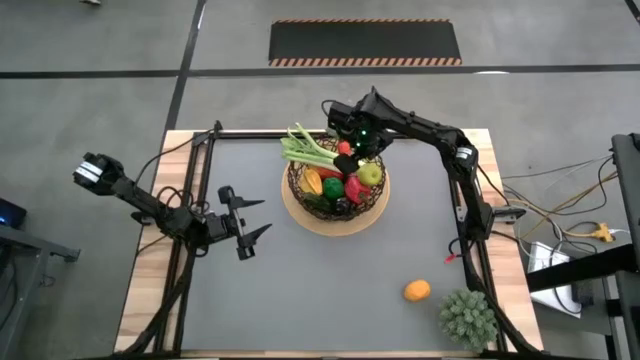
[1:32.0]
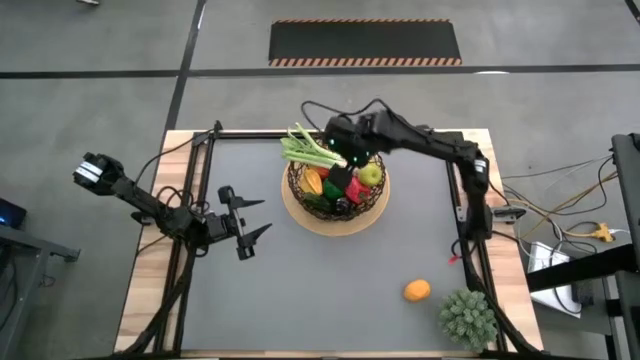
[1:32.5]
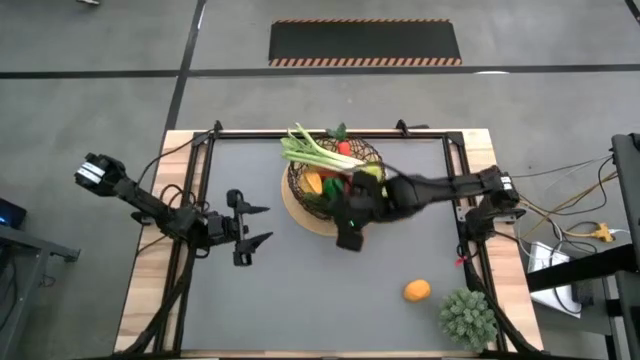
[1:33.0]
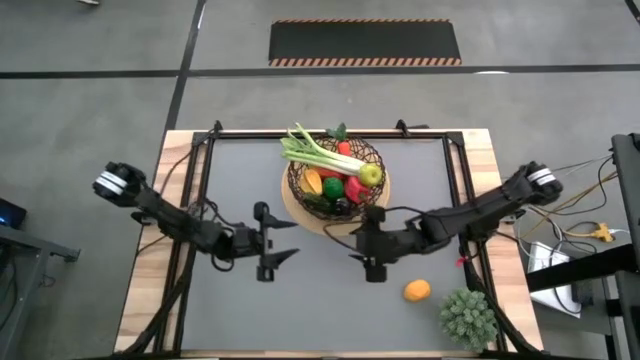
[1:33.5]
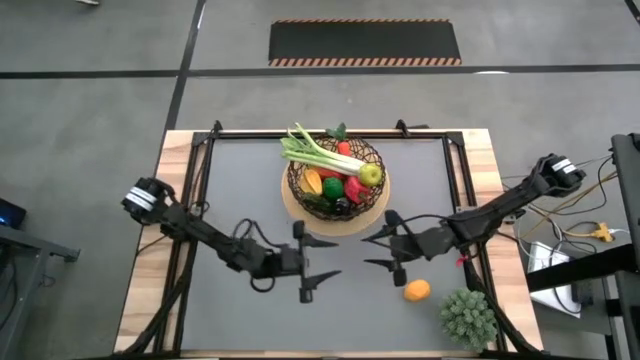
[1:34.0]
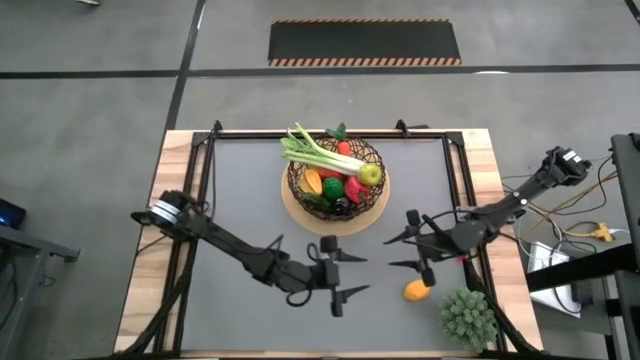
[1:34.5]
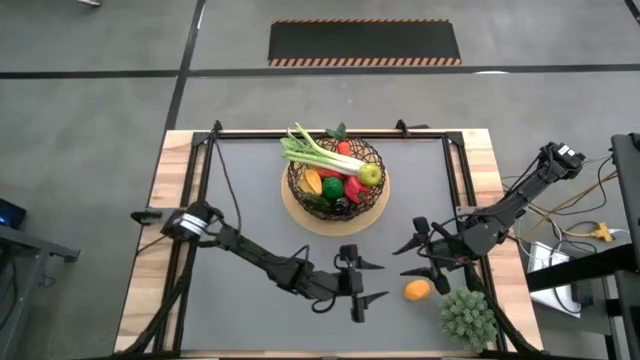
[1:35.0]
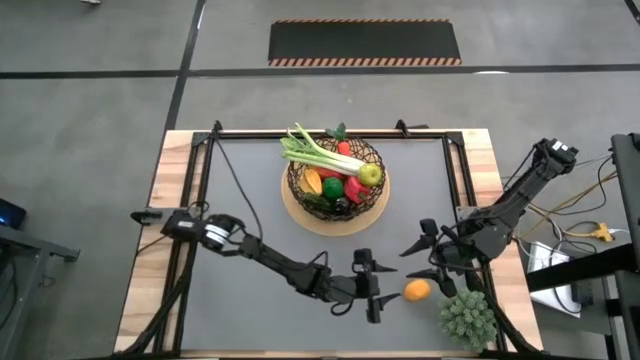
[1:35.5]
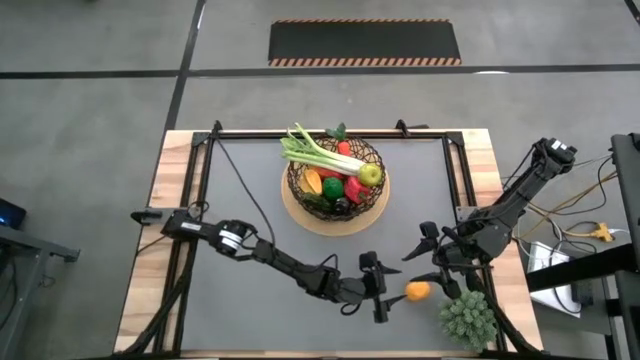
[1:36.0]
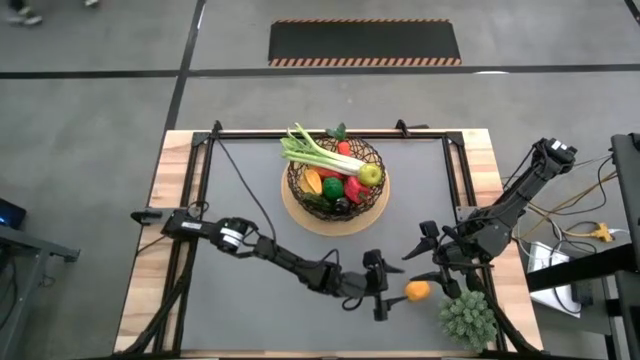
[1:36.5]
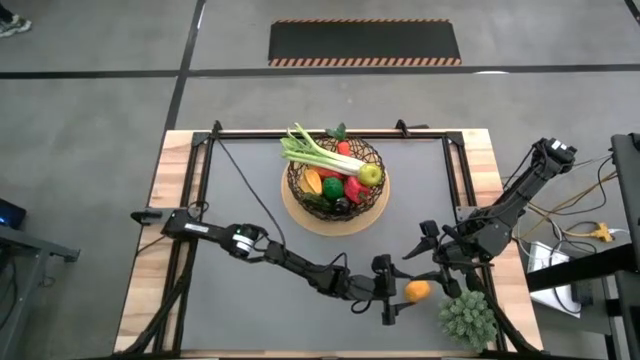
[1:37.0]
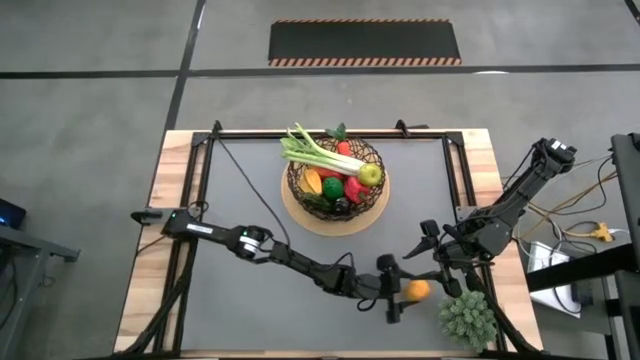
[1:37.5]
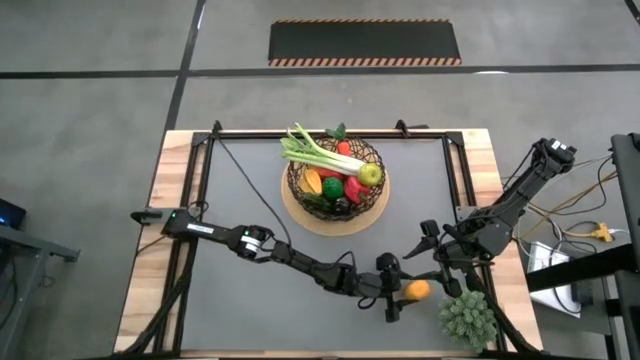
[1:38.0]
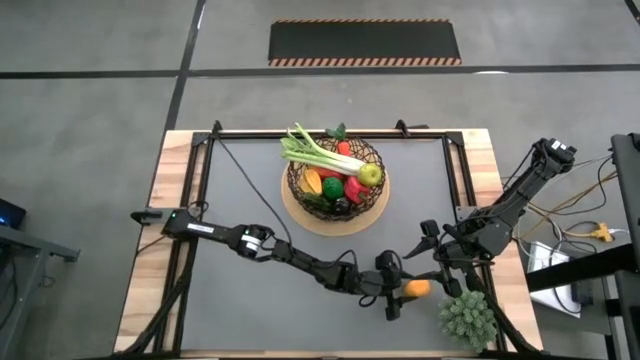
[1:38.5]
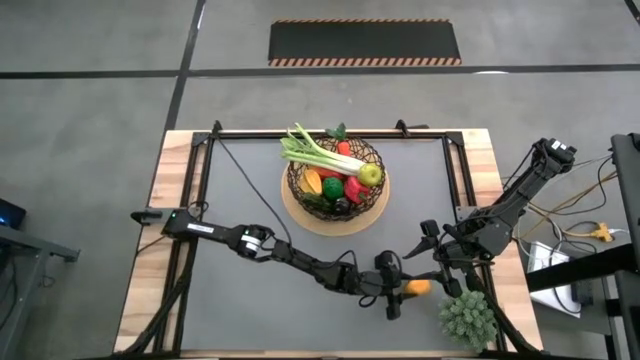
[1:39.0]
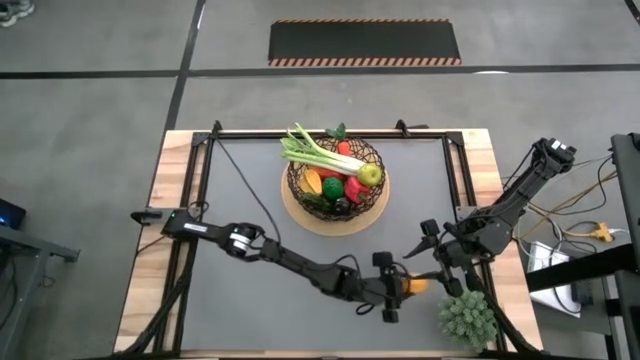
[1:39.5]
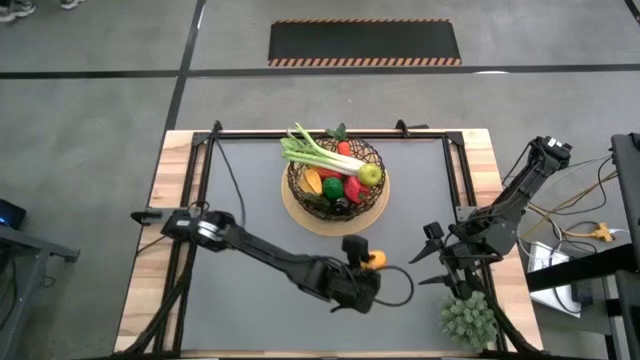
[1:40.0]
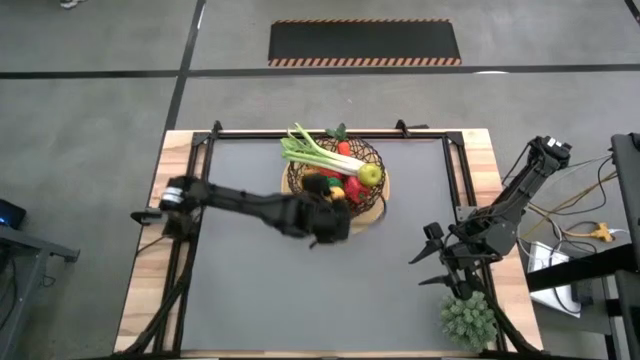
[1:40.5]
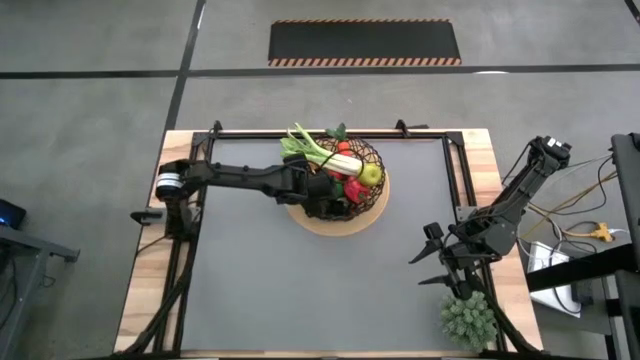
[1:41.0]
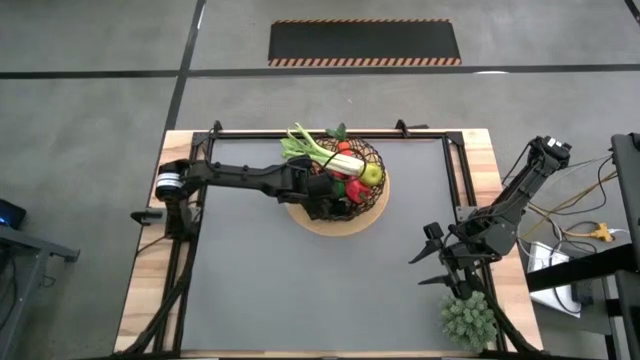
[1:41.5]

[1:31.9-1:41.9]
Task: Build produce basket
Put the lemon into the basket

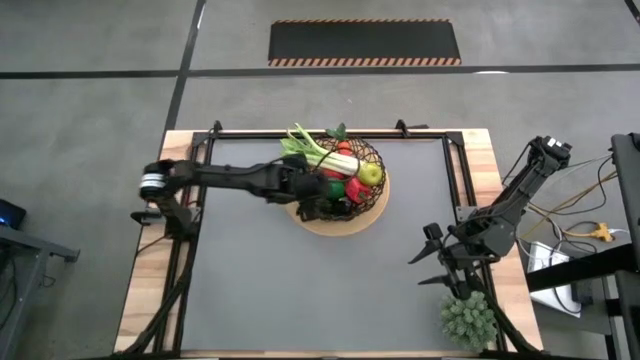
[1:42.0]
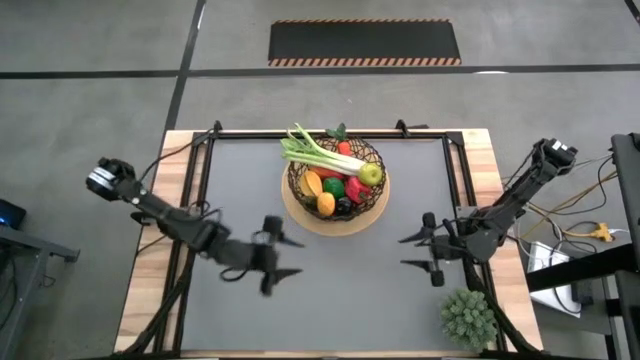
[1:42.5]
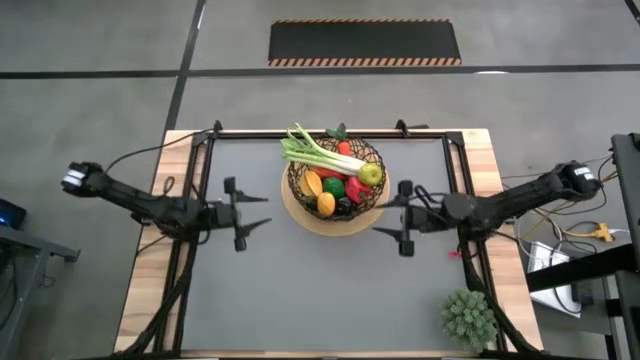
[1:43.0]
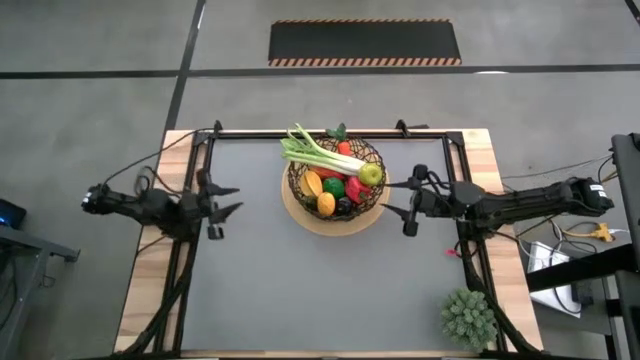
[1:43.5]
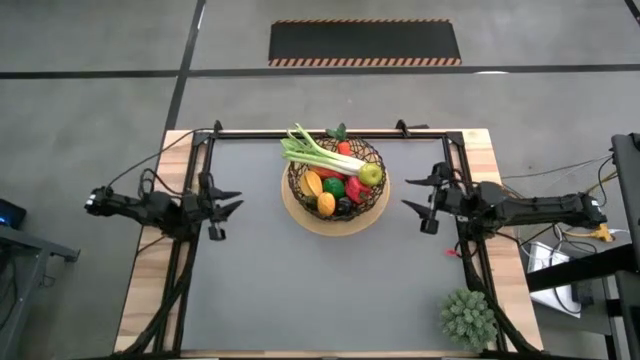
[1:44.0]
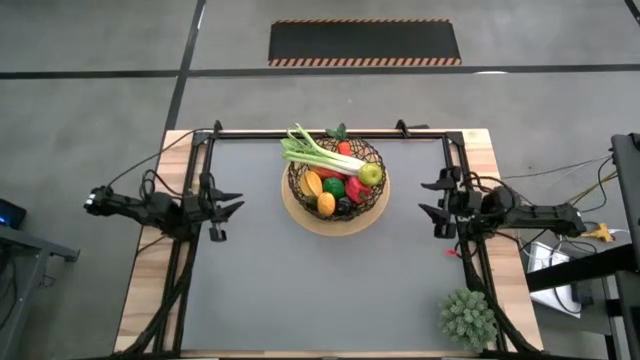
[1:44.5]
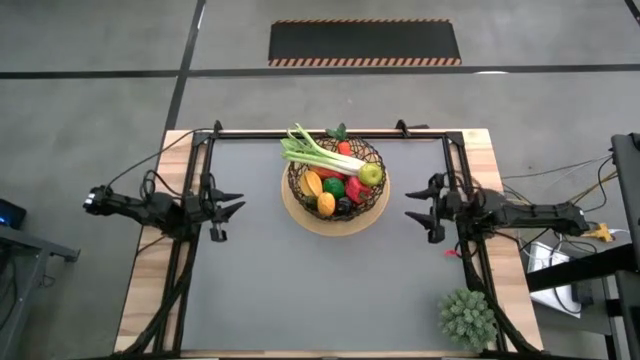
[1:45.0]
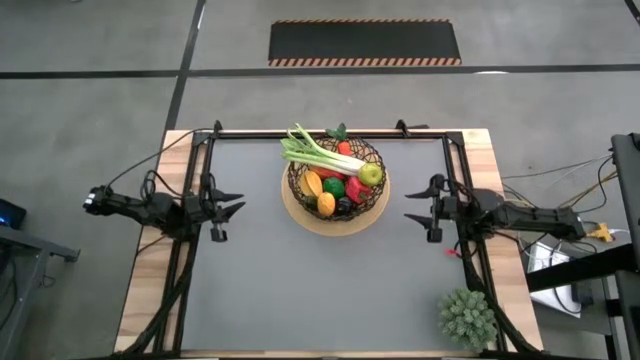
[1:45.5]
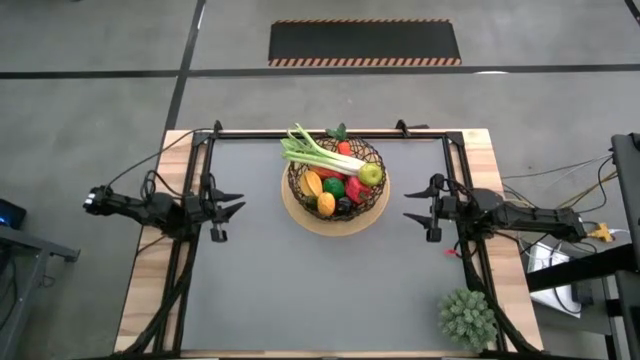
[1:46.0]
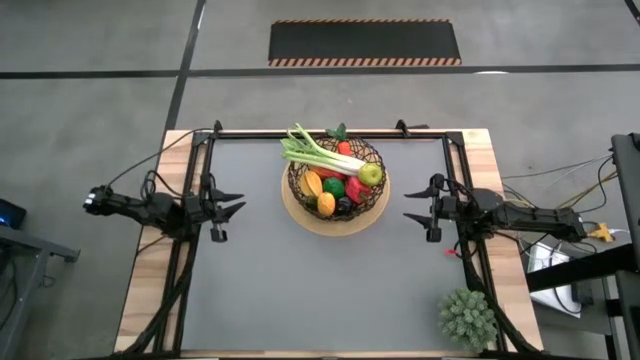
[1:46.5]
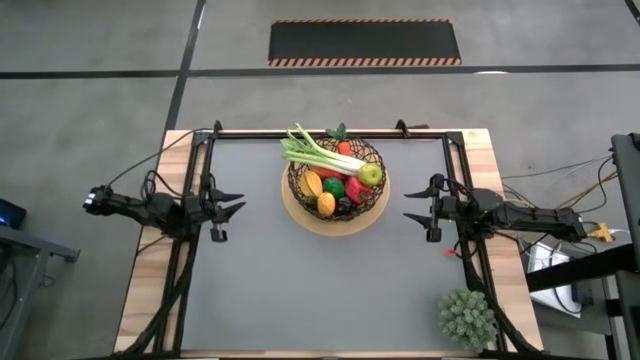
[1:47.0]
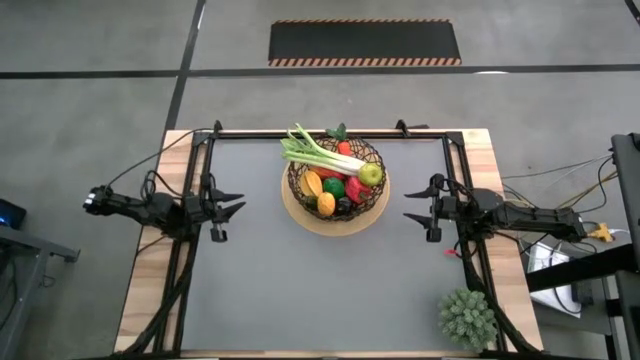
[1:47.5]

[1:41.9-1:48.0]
Return to Home Position

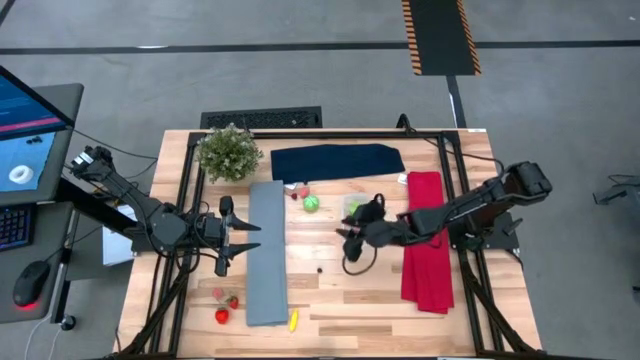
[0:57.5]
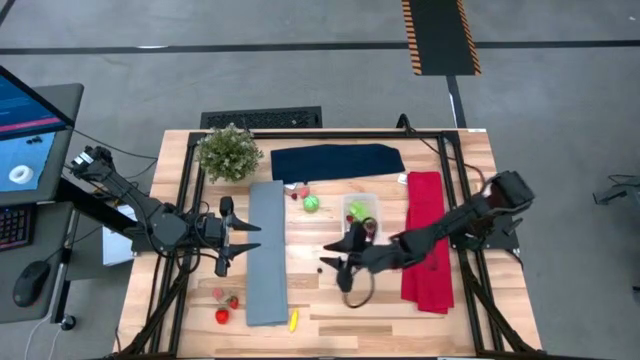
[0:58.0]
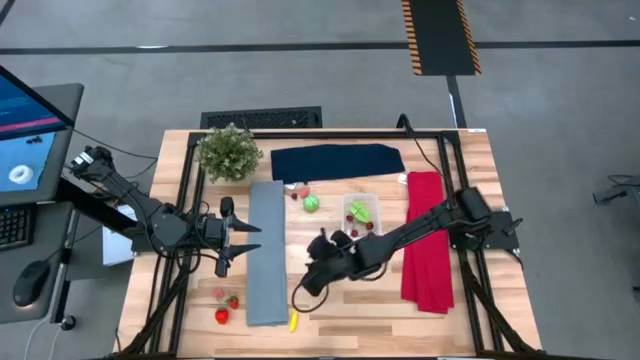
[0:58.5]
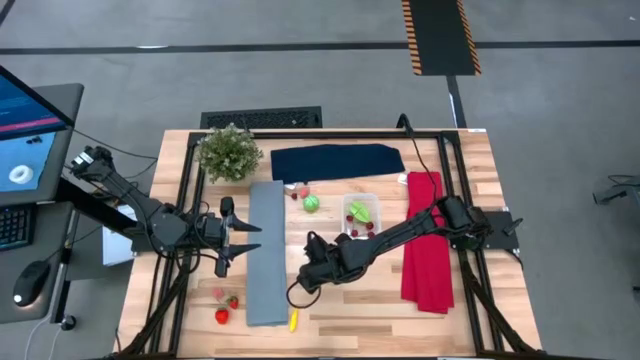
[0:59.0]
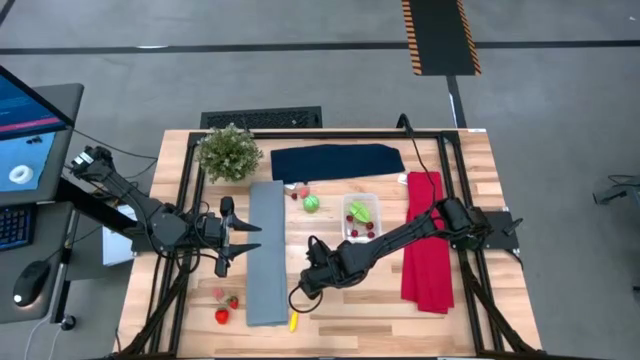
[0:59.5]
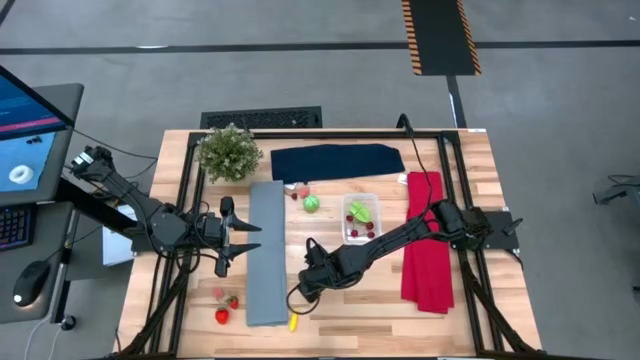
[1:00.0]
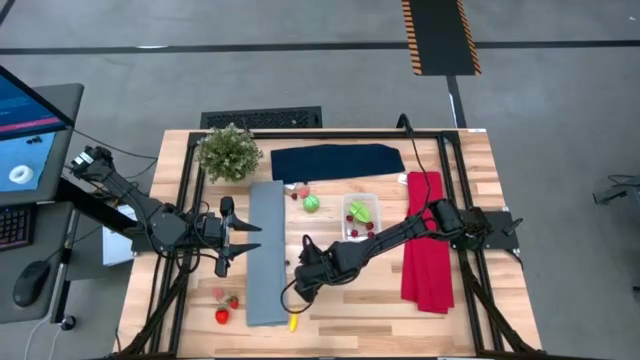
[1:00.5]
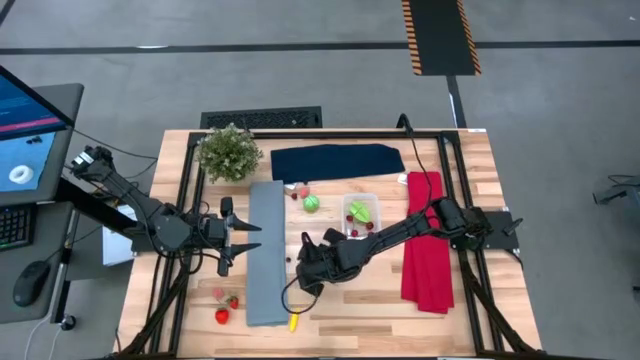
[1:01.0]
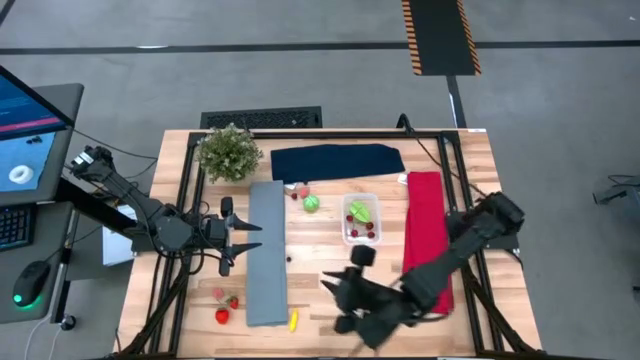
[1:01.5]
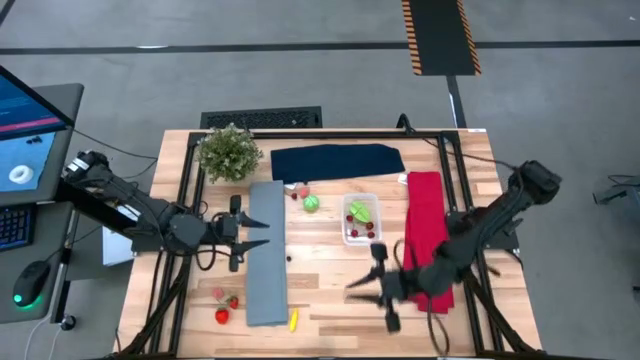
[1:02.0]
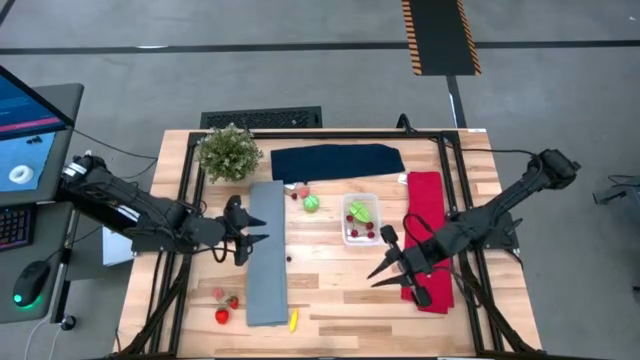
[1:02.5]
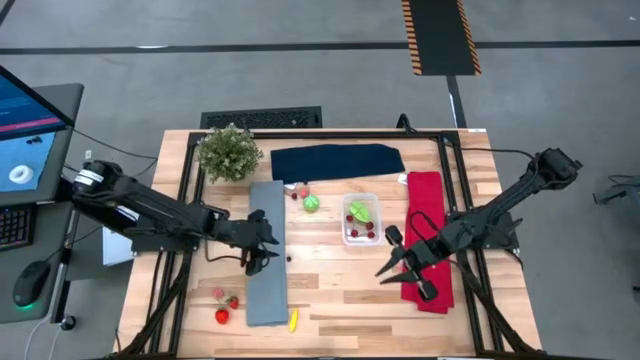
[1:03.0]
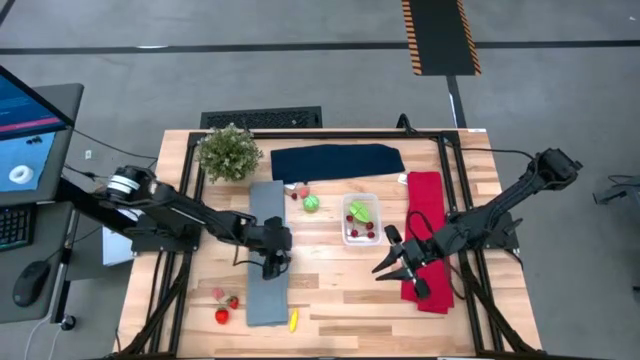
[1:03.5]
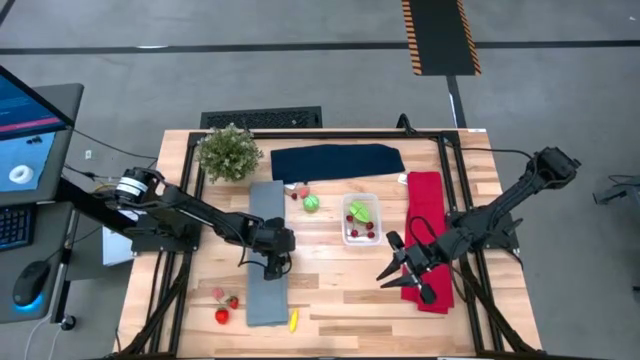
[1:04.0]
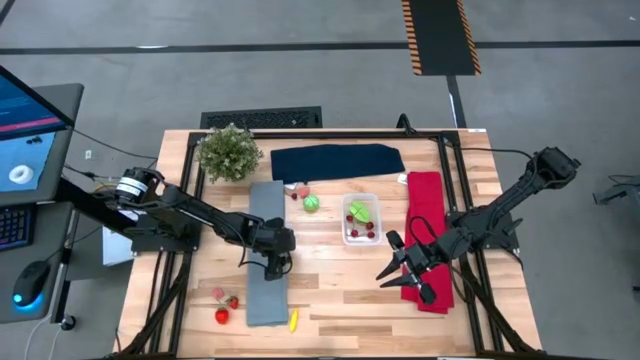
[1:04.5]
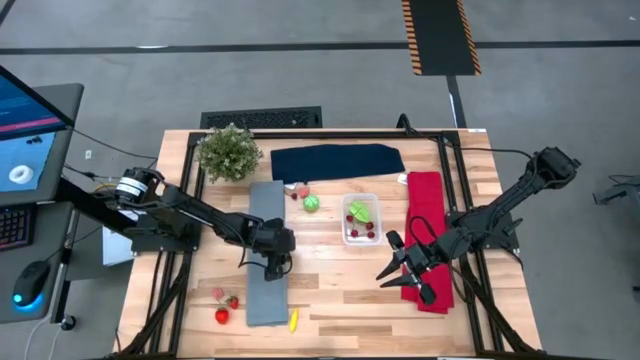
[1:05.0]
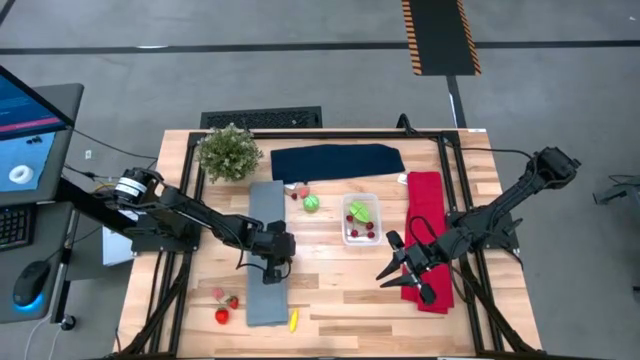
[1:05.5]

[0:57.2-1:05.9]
Task: Pick and placing Produce into tupperware
Put the blueberry into the transparent bin
